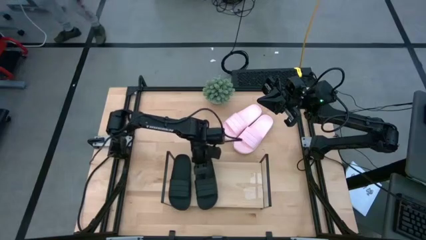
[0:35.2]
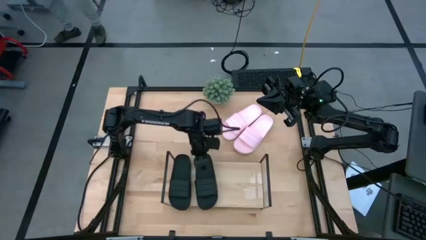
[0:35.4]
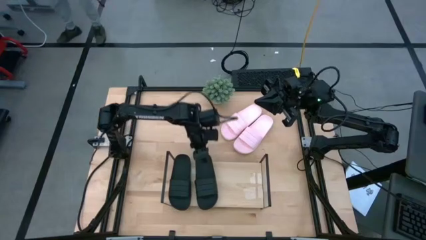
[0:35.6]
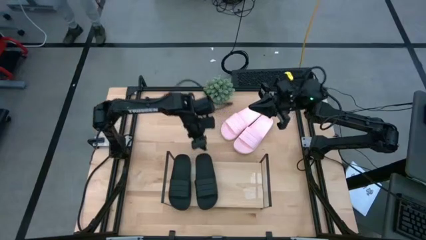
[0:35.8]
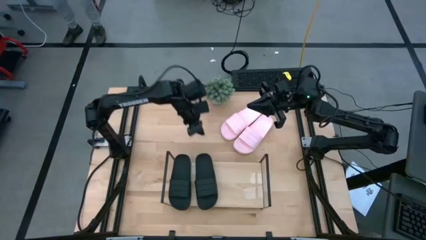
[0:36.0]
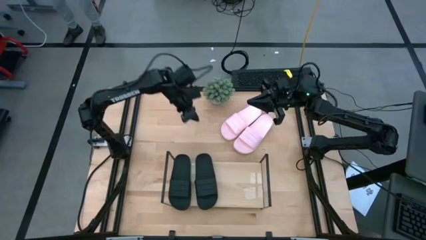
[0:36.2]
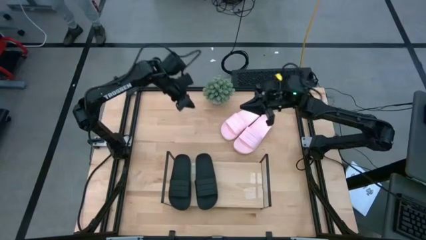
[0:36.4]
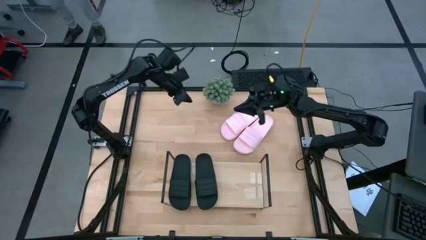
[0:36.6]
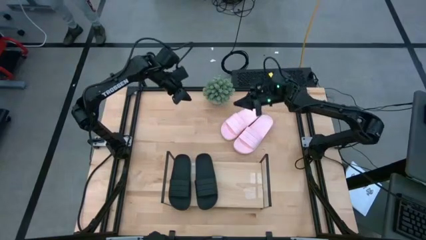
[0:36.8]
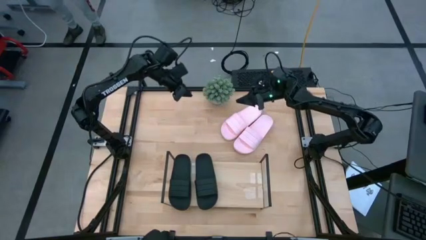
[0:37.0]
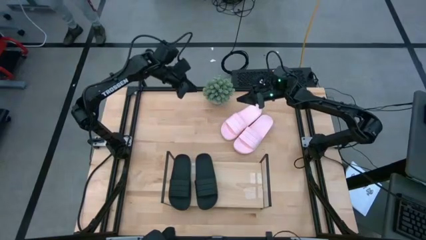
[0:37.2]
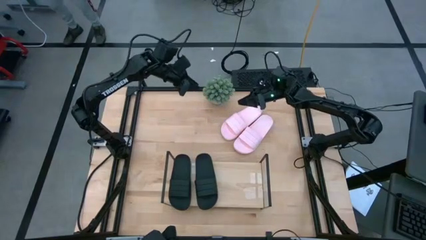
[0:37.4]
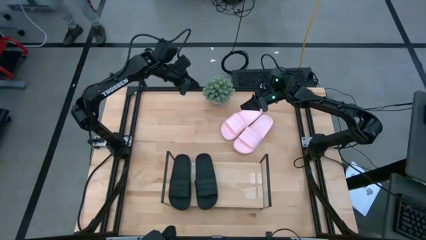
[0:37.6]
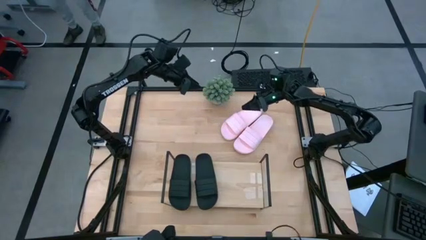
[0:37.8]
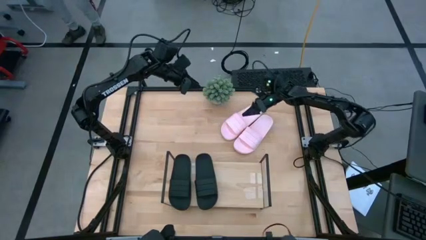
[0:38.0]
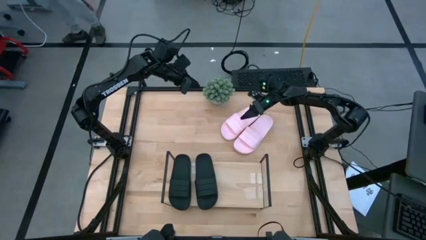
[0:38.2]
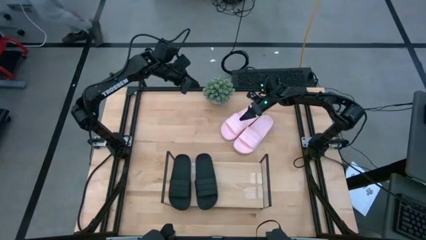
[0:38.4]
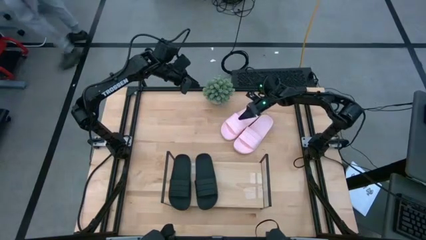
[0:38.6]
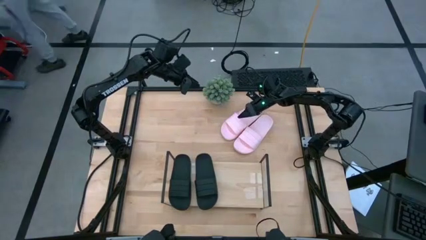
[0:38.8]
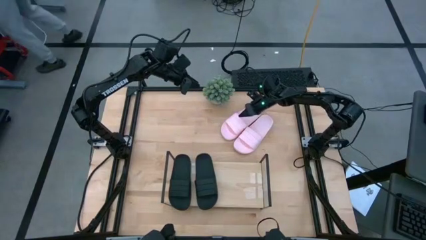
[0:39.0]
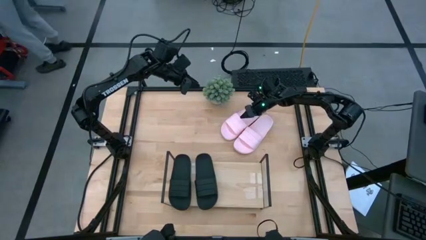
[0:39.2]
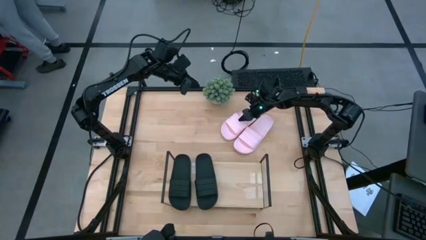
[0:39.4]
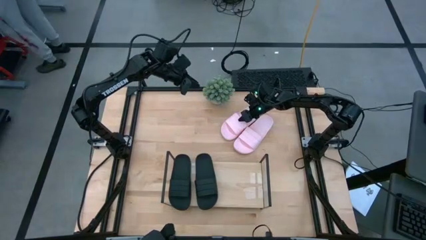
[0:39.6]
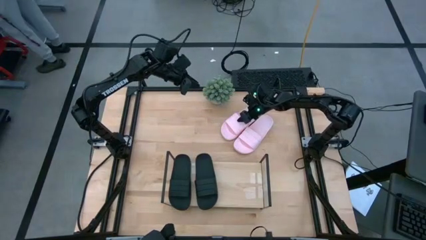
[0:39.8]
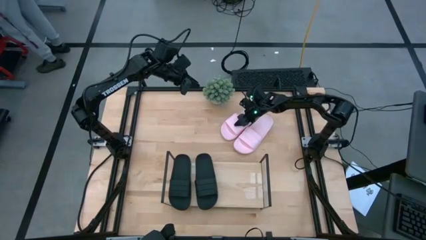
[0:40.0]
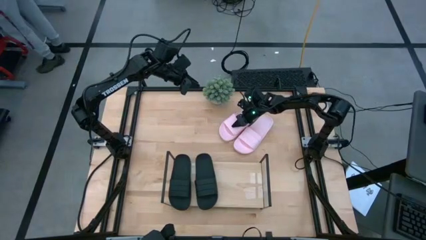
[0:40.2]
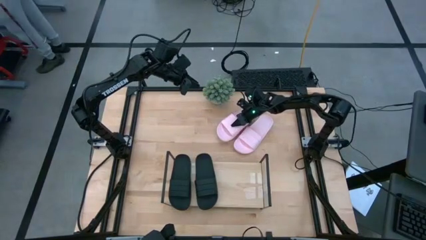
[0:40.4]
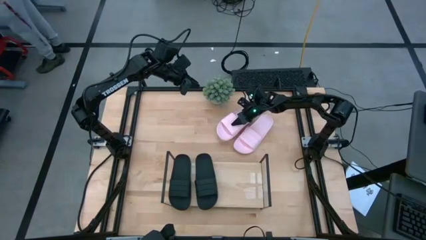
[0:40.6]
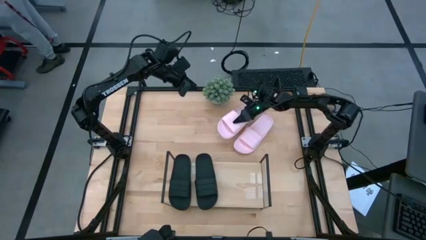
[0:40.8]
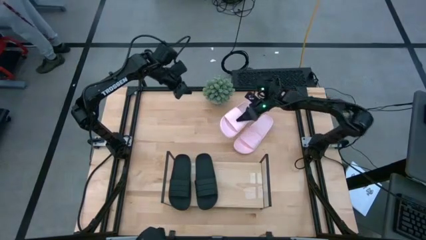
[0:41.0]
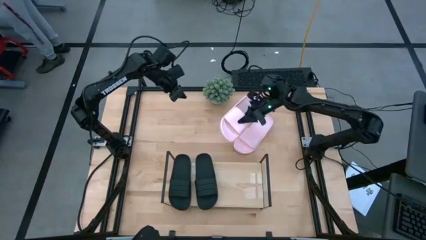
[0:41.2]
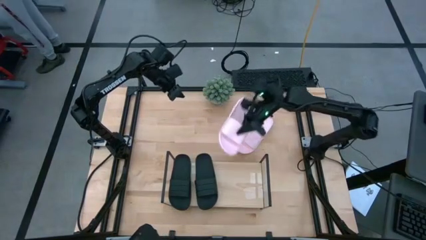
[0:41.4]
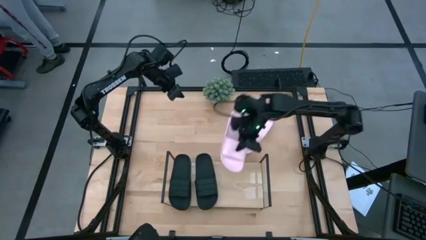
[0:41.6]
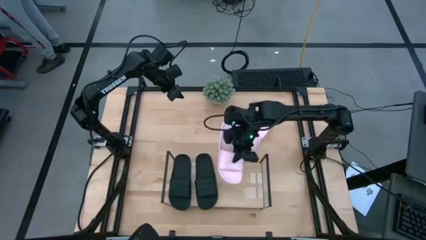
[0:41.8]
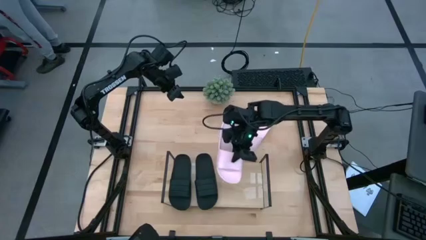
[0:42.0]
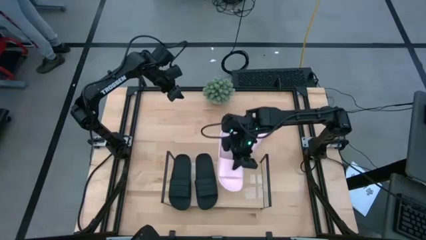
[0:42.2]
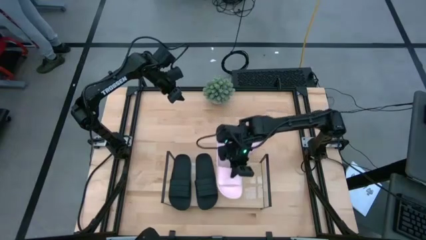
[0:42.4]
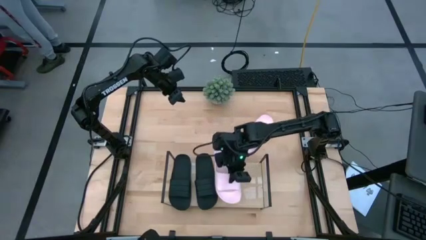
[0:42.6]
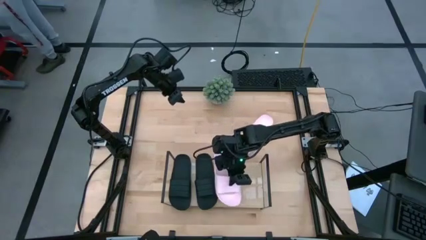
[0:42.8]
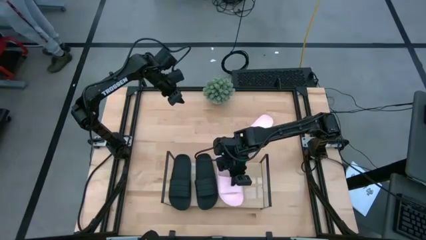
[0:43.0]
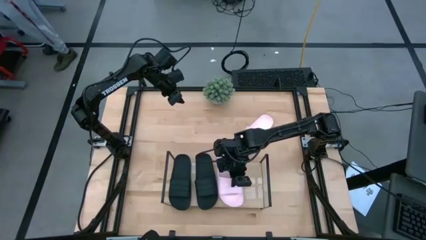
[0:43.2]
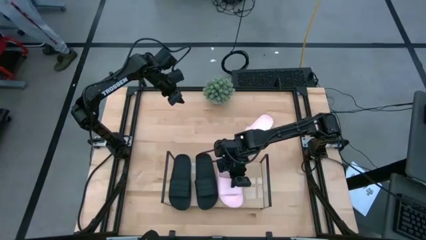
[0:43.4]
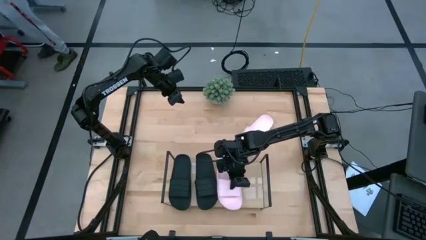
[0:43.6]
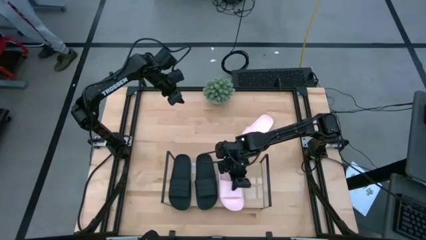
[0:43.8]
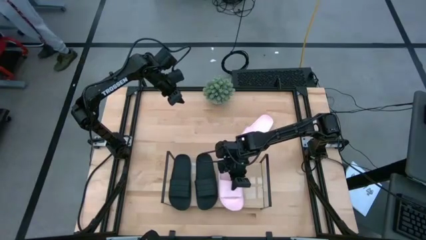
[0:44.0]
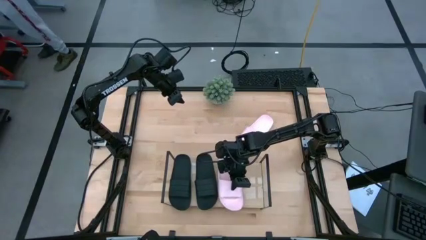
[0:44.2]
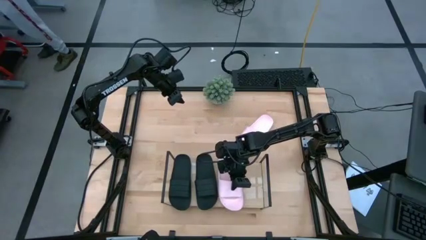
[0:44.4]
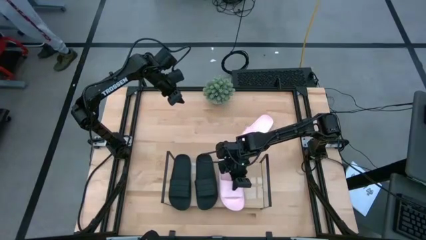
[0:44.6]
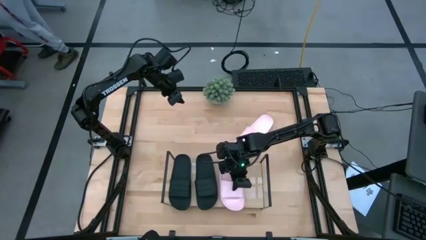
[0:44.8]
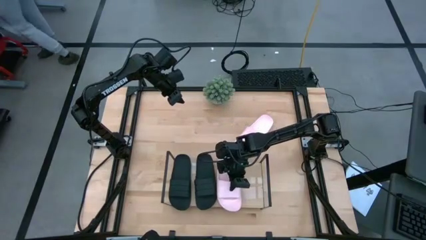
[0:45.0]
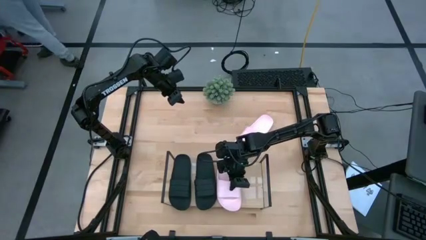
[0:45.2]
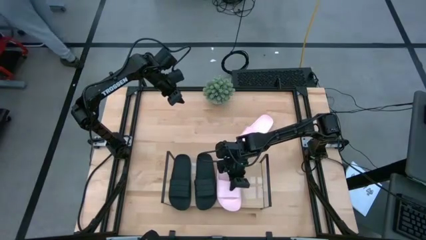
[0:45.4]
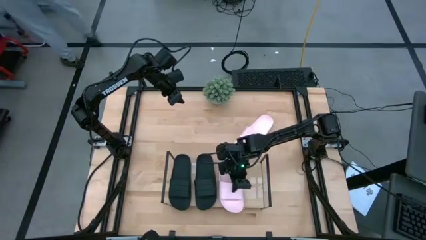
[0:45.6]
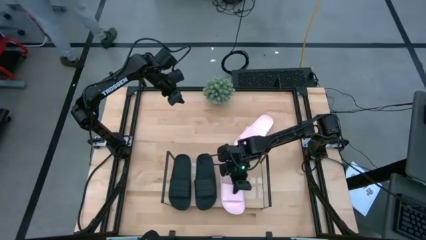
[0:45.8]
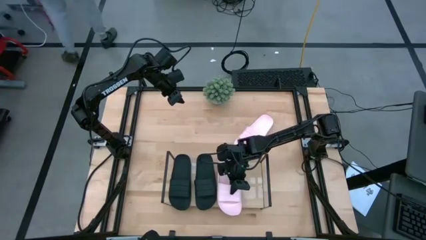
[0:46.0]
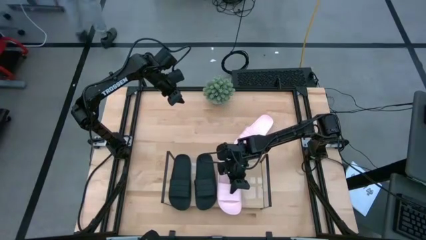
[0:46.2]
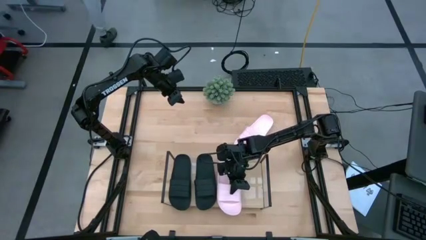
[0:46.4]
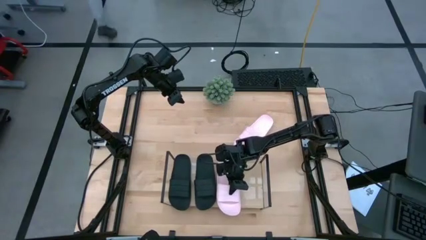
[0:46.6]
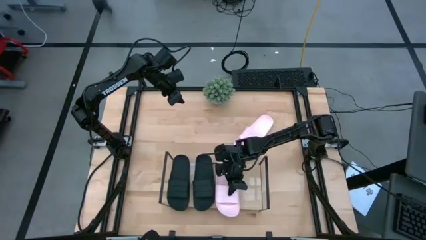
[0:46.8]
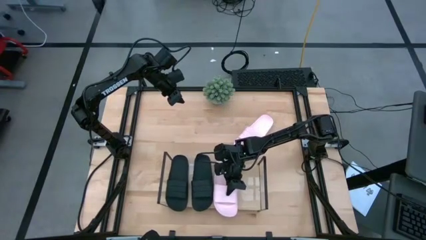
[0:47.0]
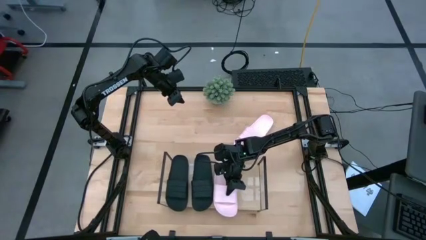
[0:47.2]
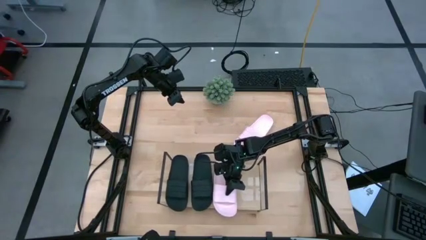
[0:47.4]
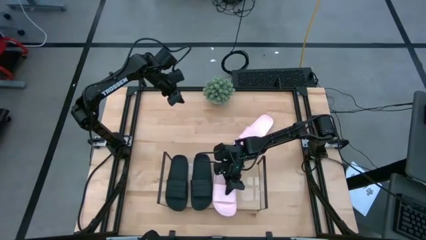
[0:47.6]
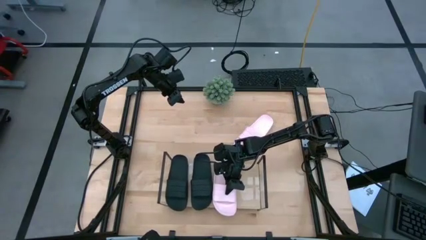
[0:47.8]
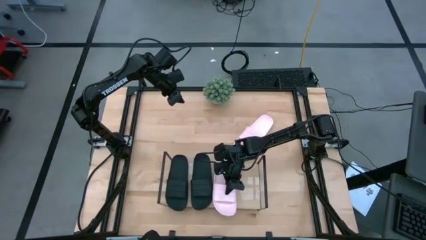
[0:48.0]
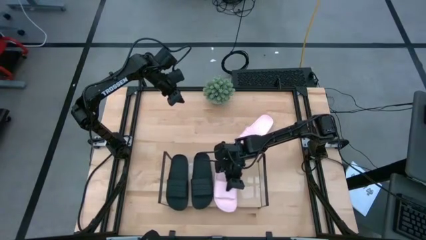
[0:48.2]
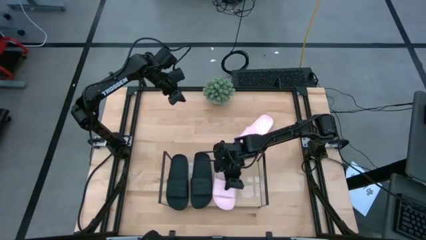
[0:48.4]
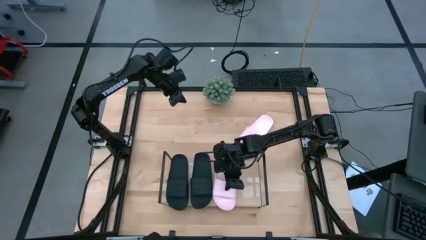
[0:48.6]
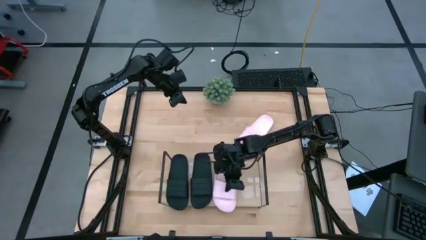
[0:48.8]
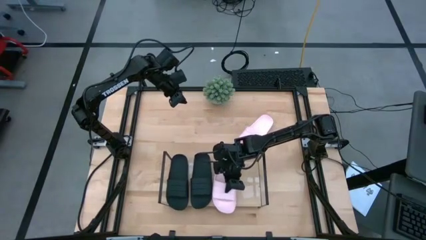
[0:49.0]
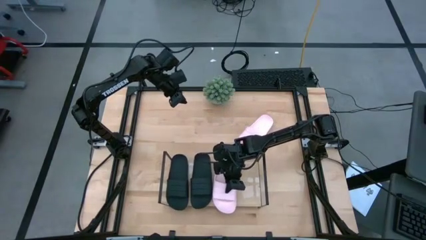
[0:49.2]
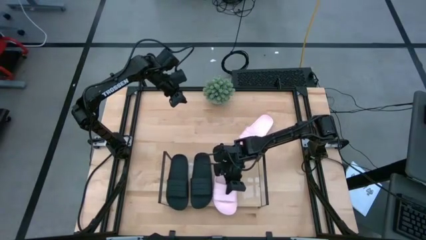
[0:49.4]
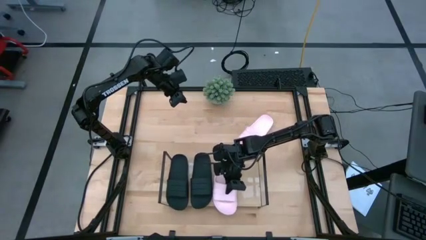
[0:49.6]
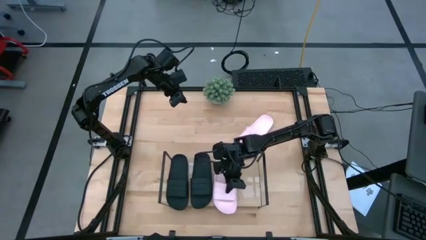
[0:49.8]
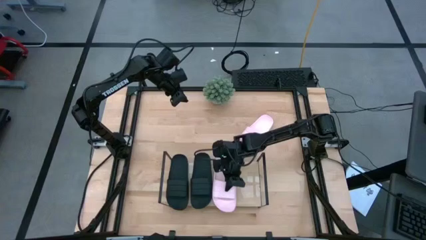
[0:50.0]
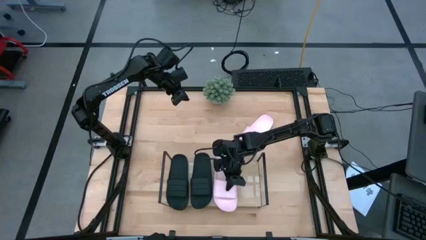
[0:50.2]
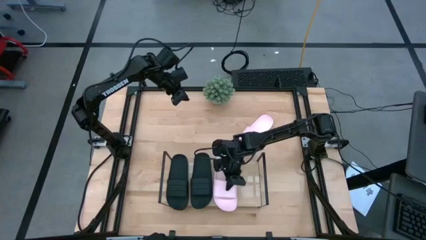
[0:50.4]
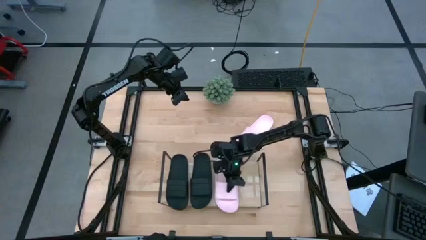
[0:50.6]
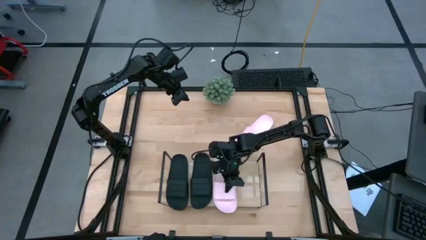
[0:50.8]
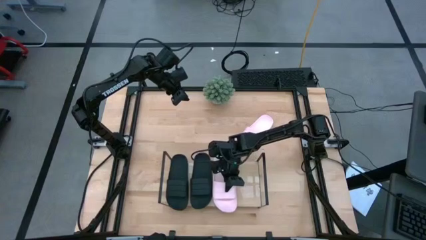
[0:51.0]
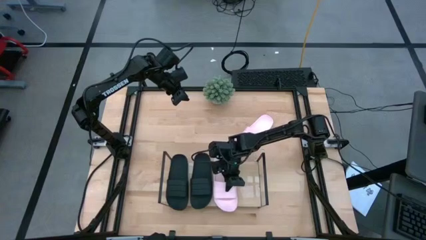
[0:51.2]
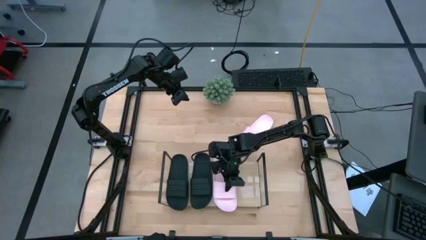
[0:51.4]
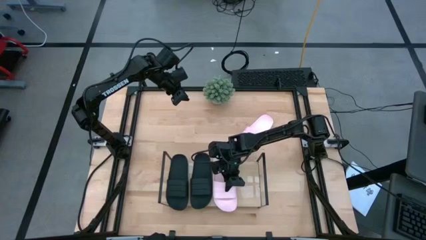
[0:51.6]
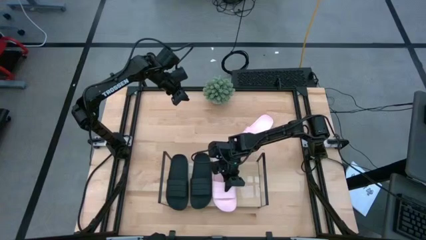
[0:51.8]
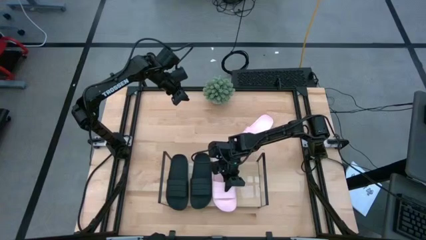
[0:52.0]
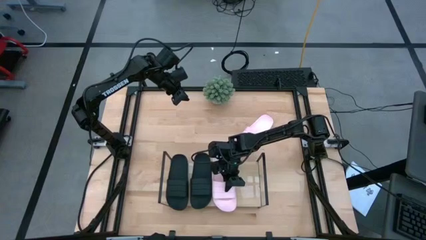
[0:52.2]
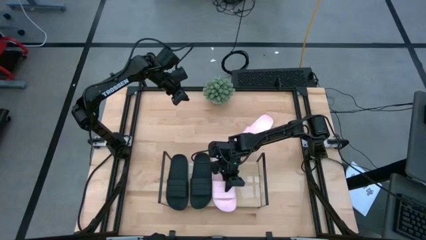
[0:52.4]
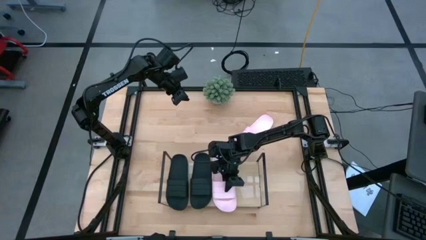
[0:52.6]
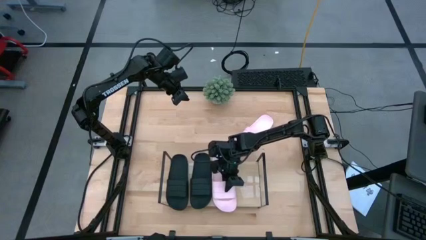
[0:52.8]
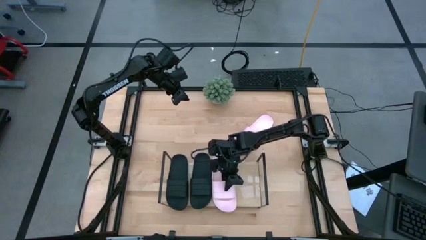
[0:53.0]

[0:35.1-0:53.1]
Task: Pick and place slides into the shelf
Put the right pink slipper on the shelf
